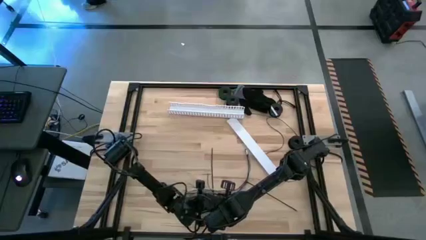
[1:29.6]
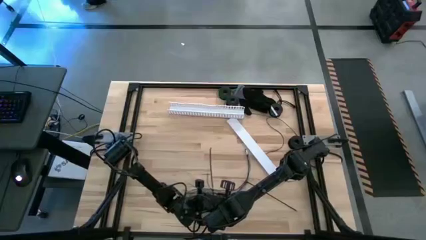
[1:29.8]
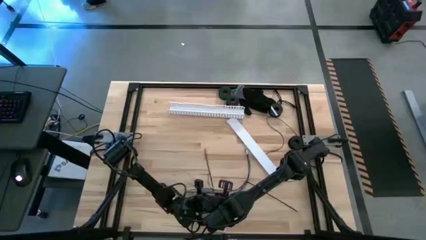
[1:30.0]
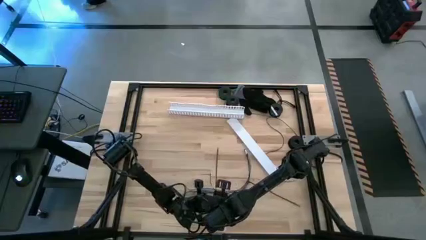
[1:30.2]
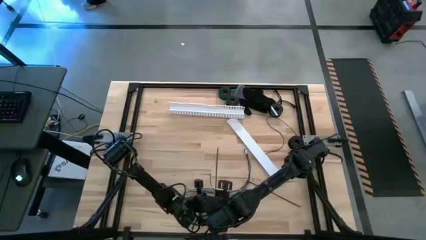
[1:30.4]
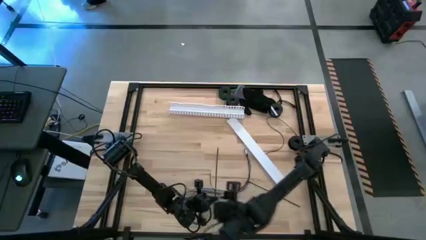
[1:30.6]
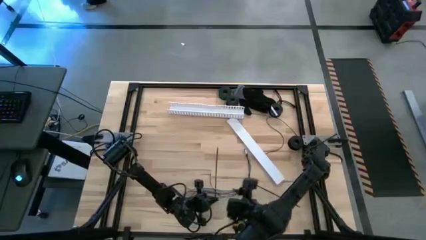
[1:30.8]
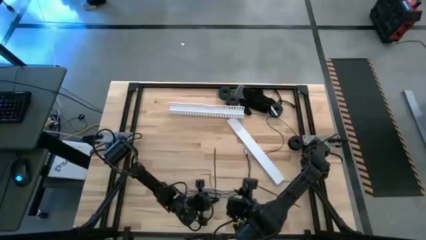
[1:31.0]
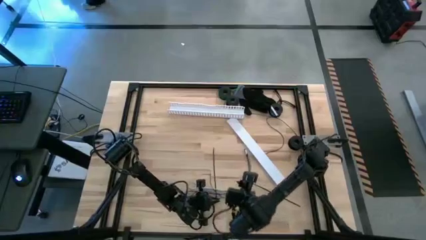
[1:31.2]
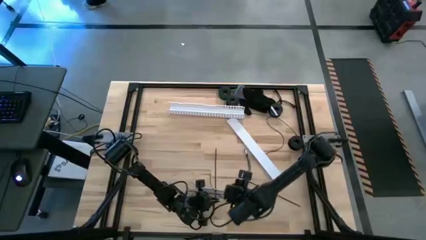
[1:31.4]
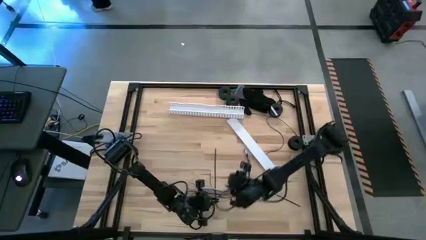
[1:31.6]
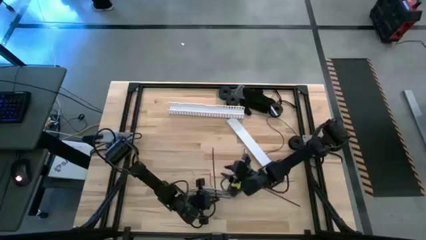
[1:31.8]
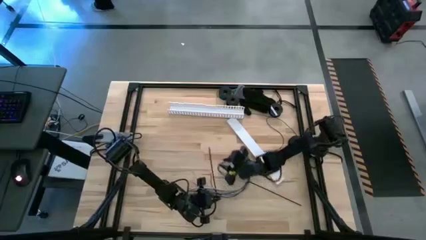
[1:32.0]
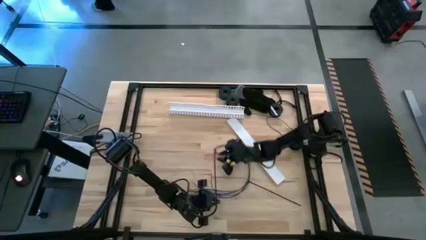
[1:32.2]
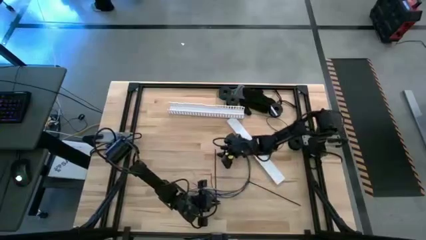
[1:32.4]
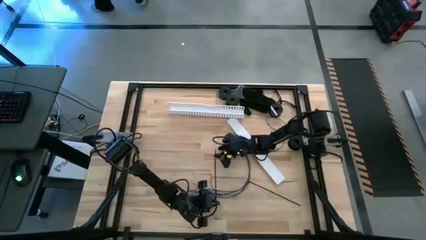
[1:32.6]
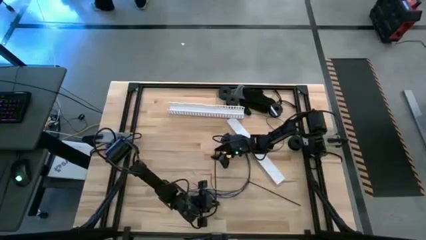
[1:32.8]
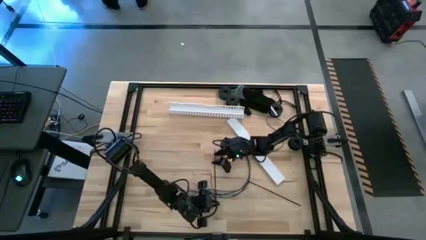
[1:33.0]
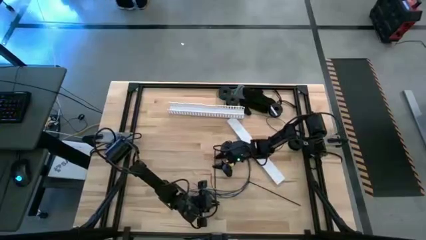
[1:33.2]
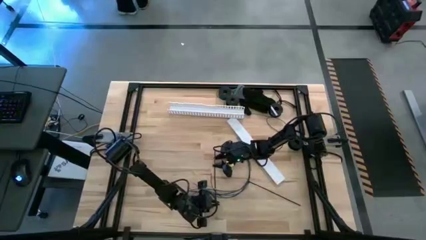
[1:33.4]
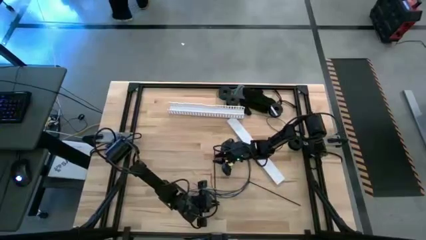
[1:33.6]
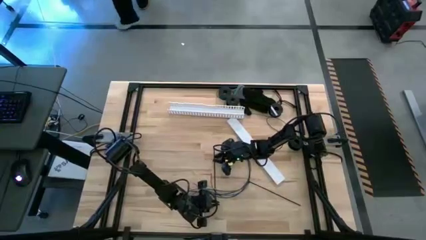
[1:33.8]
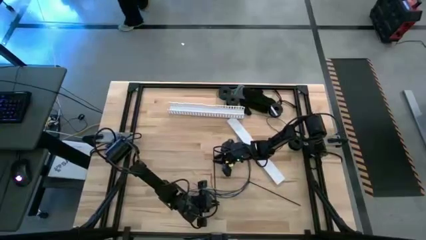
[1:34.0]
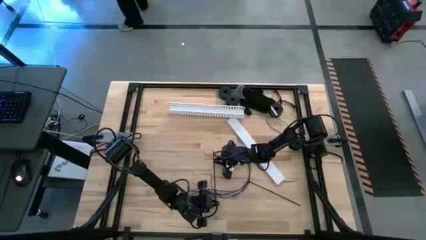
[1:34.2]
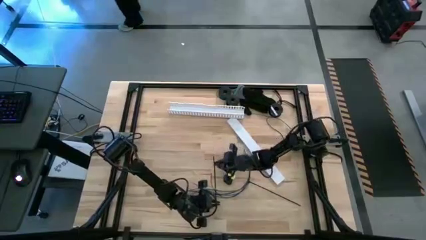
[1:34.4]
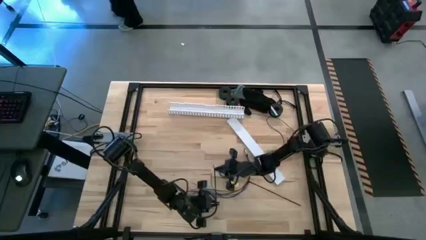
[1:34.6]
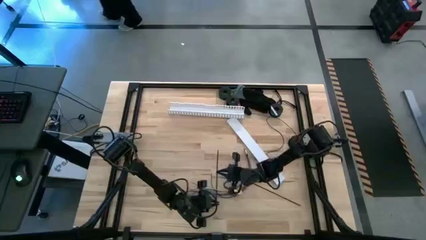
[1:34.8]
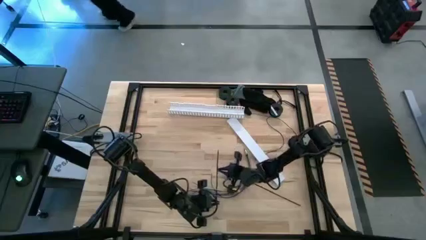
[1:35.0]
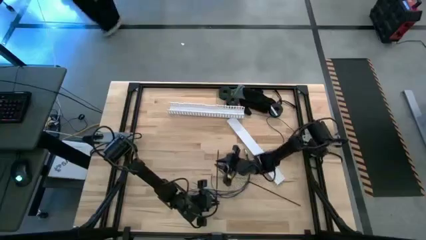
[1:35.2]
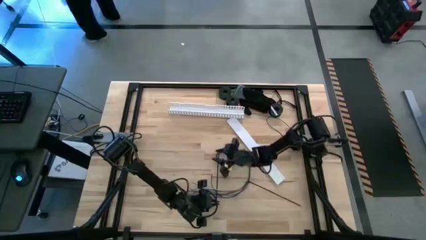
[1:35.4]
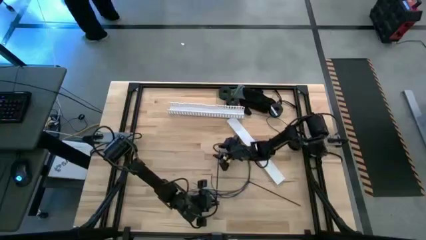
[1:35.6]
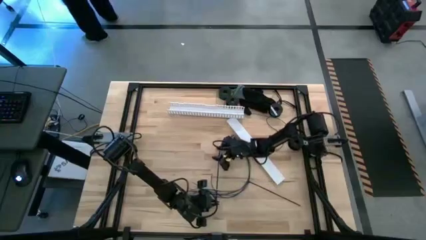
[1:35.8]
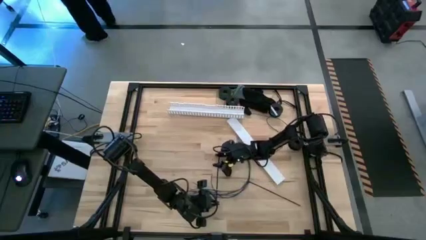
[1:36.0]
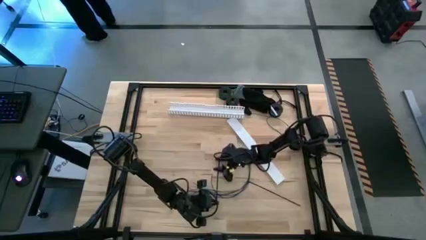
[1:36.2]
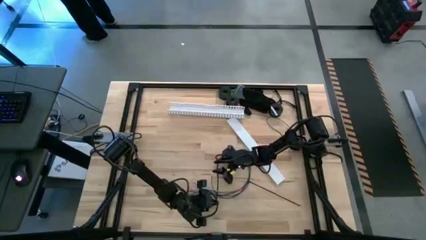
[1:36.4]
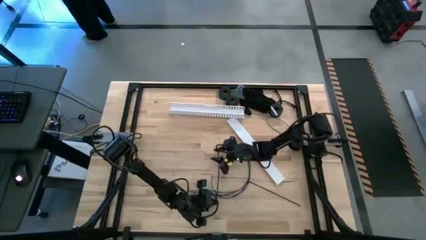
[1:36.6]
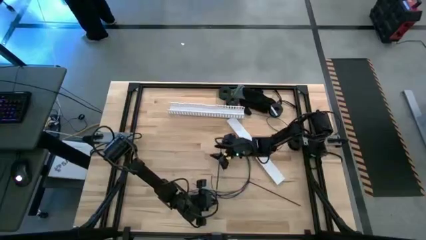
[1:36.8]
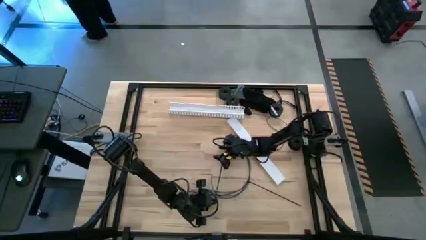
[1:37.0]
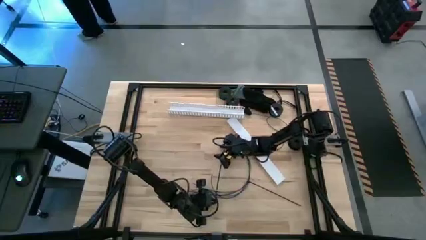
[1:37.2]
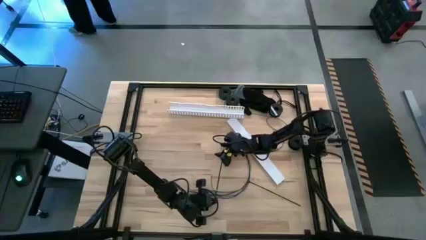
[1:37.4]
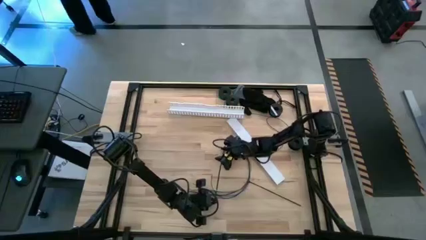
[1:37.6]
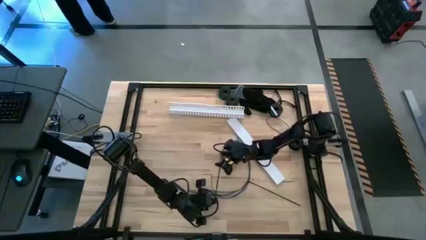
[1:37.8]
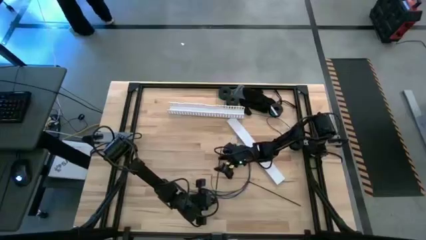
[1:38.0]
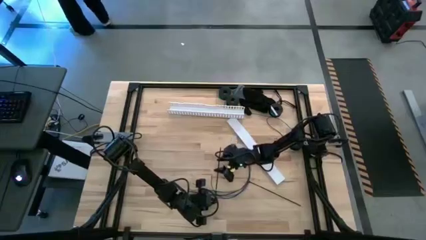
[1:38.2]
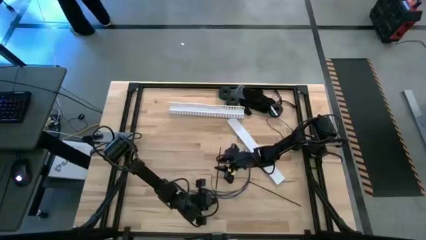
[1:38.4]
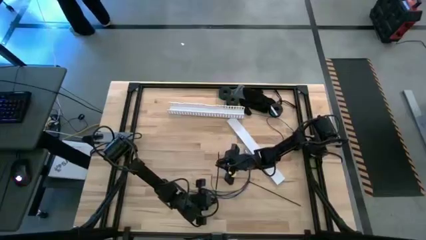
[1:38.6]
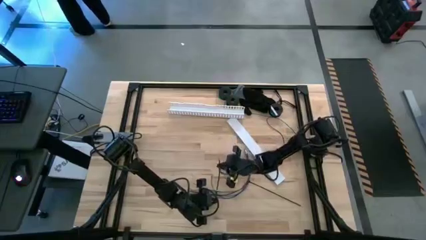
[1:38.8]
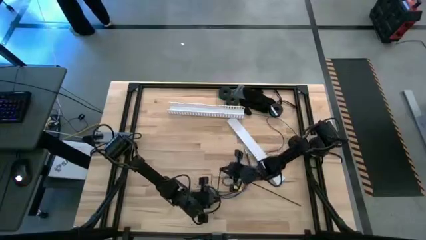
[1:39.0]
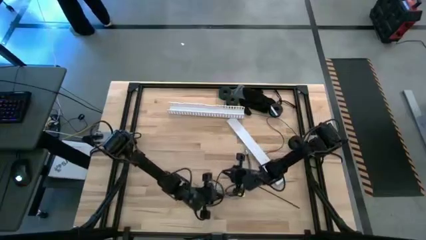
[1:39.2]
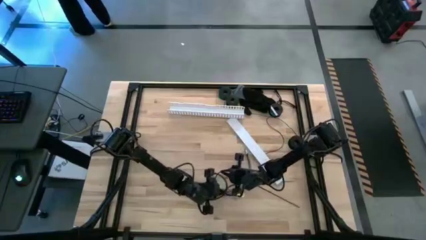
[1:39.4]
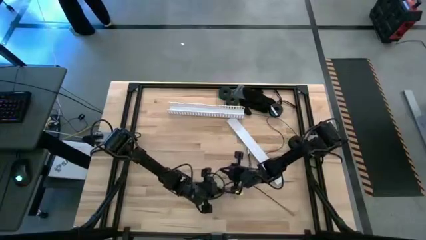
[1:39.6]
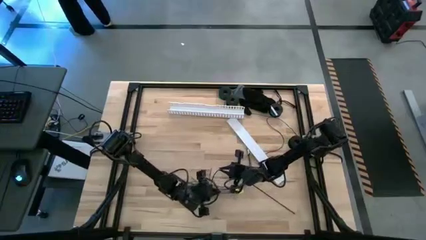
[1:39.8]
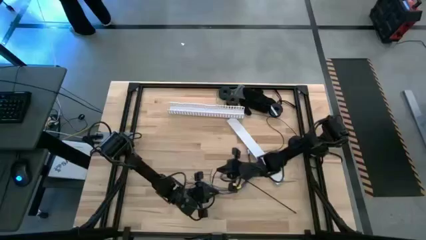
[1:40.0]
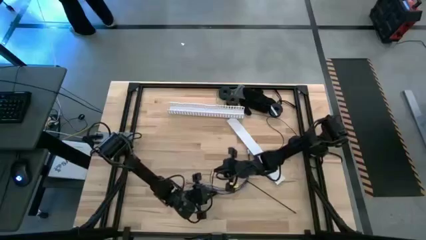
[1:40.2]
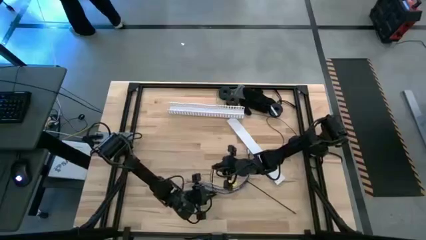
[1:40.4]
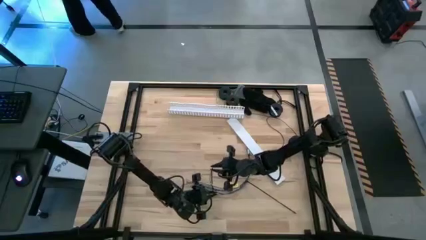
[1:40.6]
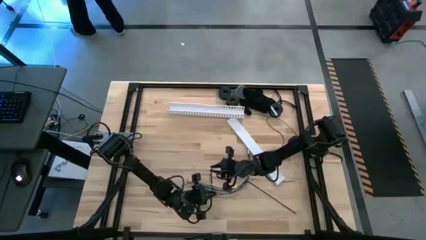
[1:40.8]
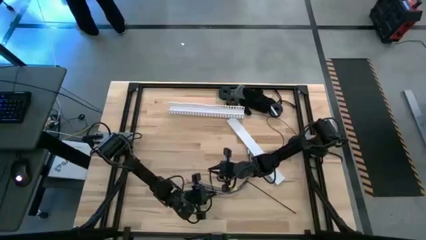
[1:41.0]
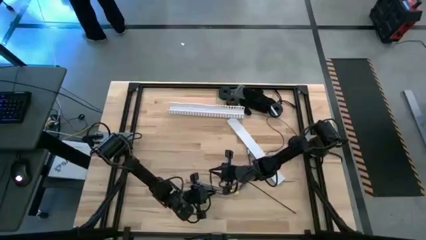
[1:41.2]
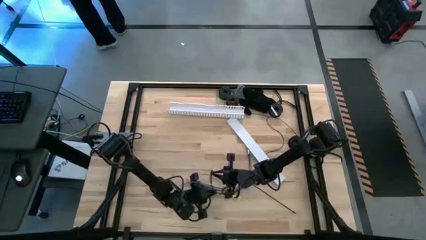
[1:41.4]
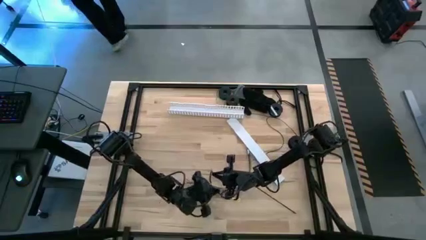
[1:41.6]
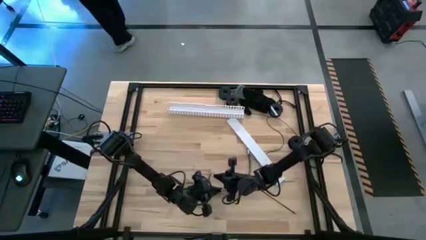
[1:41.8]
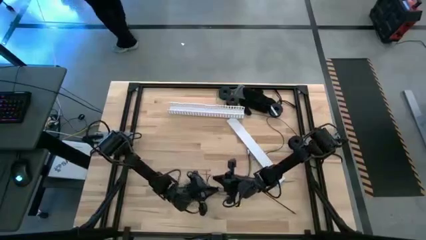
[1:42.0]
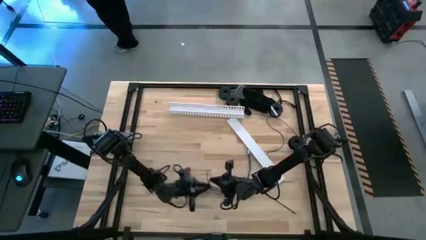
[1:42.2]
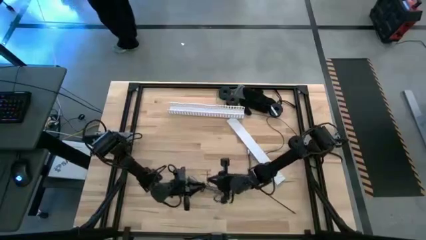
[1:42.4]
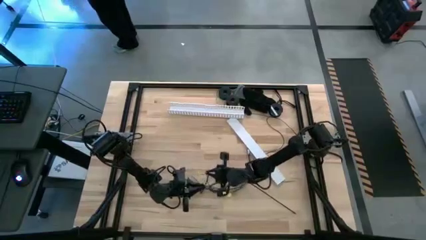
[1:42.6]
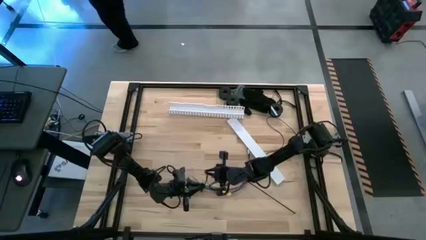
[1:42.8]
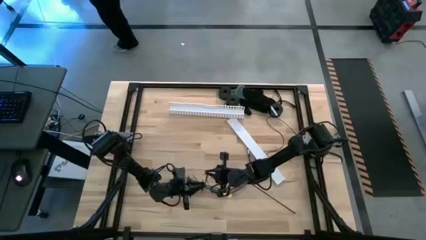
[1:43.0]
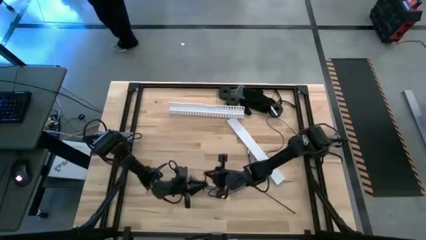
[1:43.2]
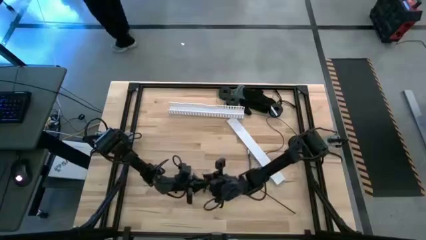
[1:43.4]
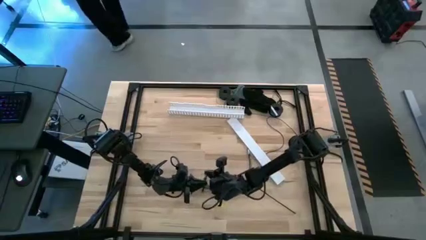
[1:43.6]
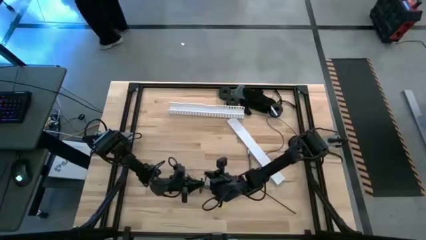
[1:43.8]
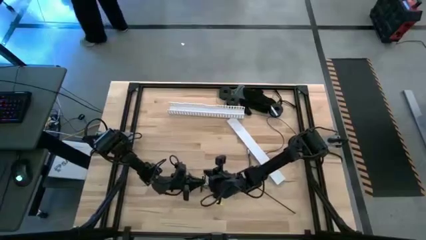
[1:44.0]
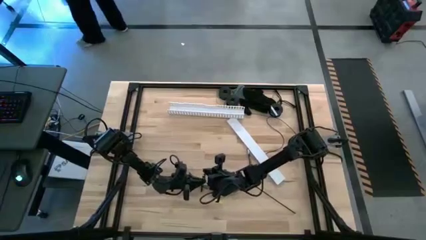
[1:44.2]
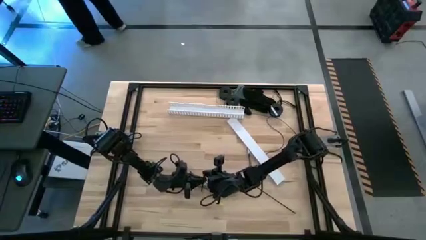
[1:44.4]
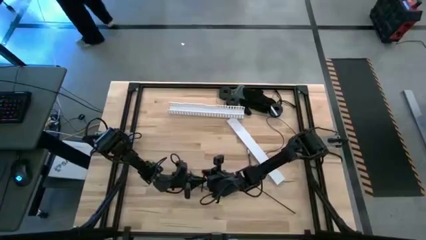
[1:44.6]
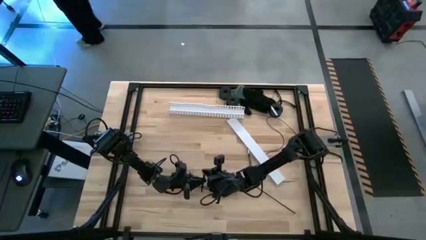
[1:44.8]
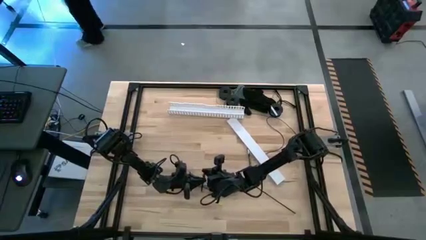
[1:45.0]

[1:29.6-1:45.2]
Task: Ziptie cables
Wrap the wire cables with the black zip tie
